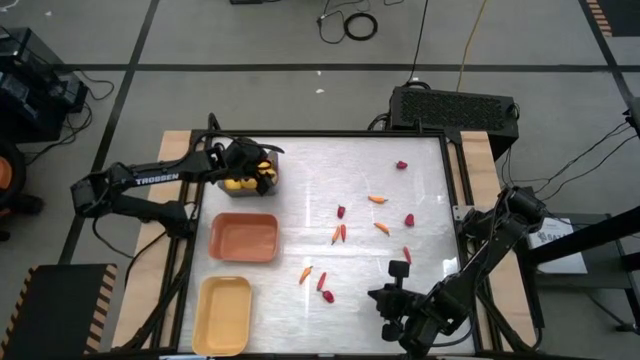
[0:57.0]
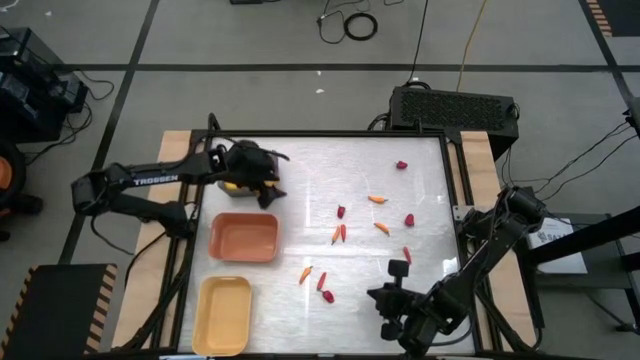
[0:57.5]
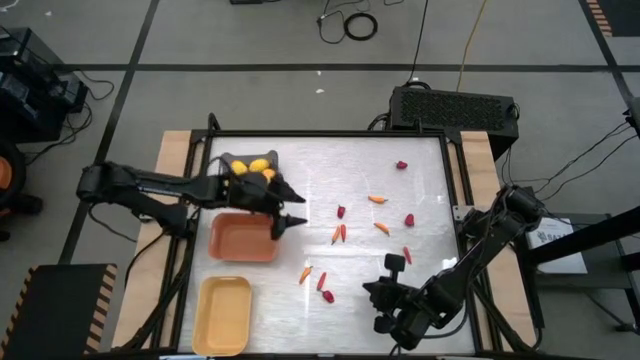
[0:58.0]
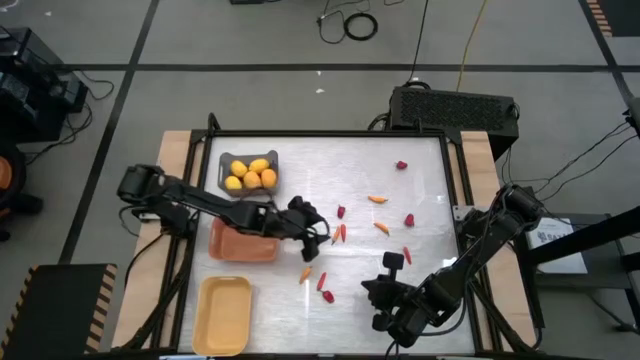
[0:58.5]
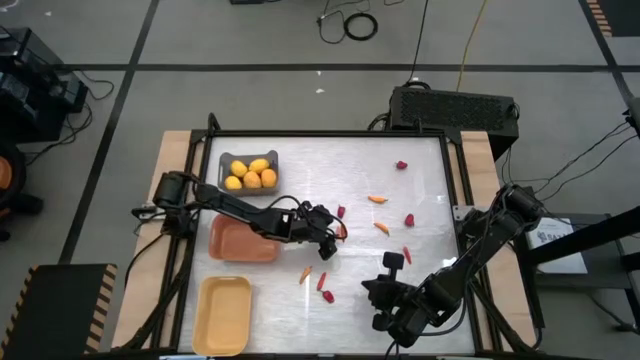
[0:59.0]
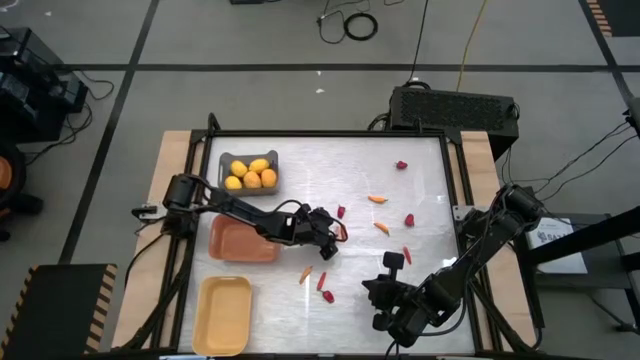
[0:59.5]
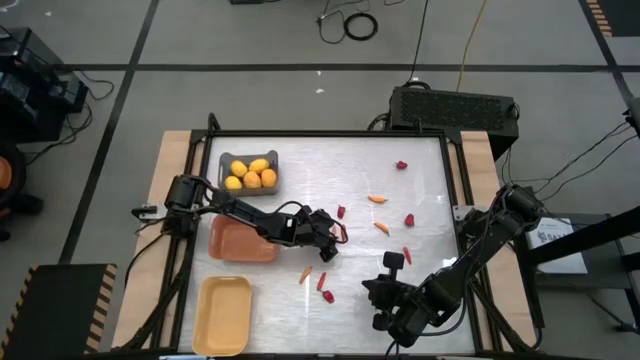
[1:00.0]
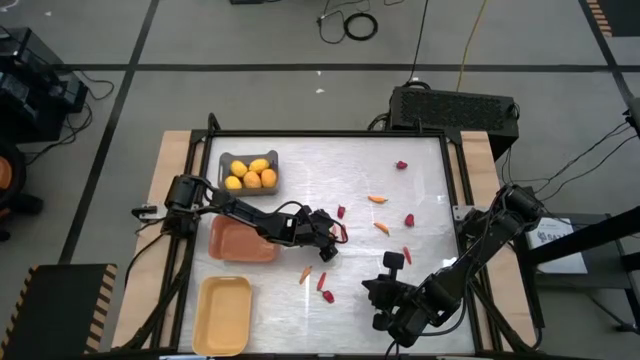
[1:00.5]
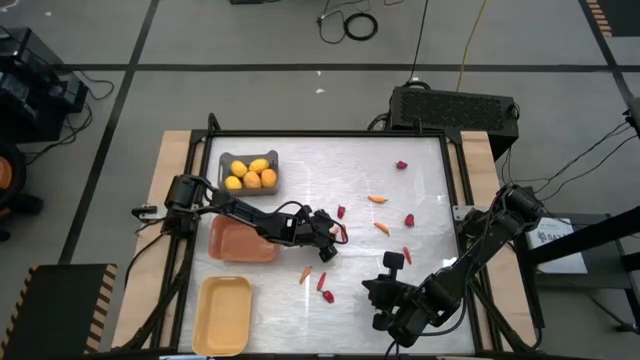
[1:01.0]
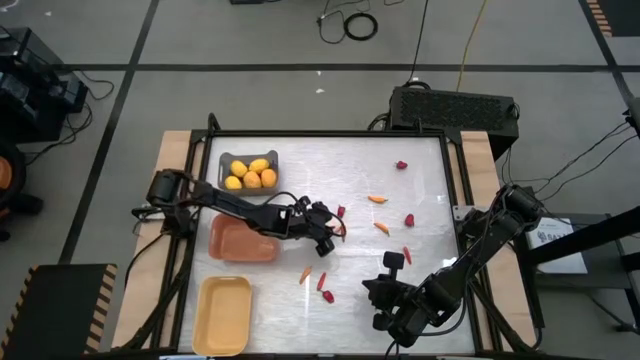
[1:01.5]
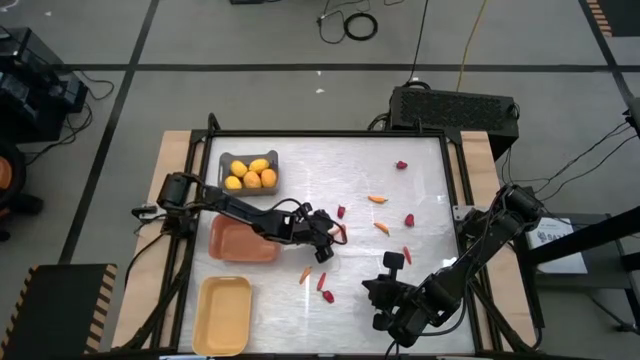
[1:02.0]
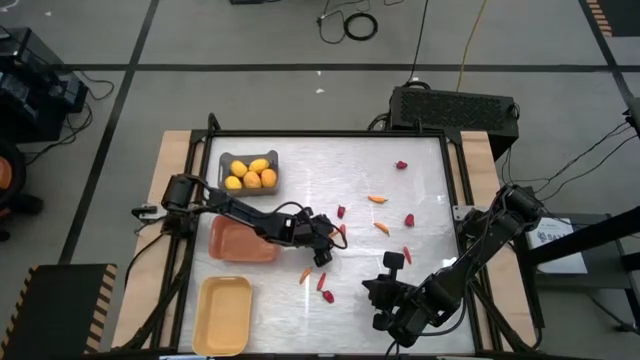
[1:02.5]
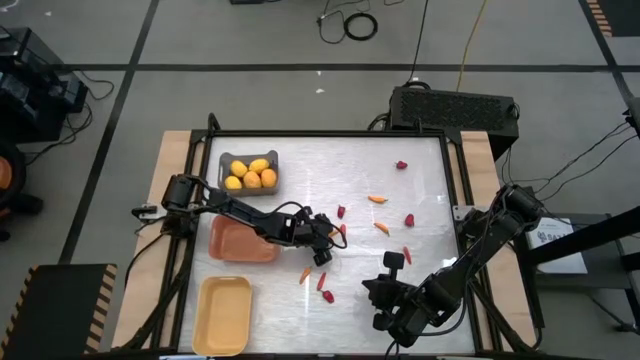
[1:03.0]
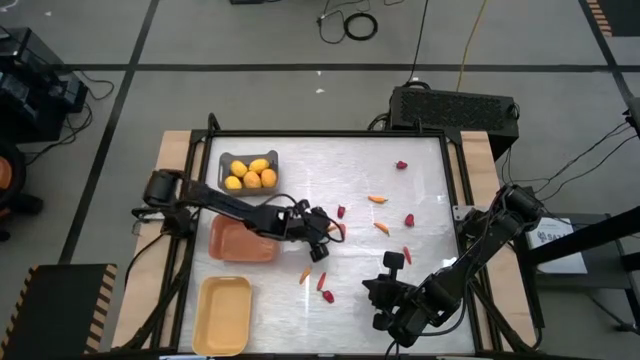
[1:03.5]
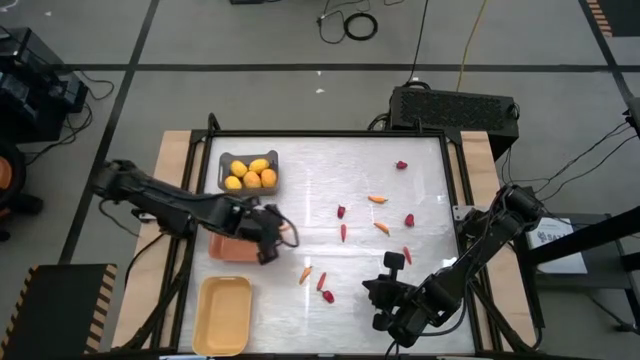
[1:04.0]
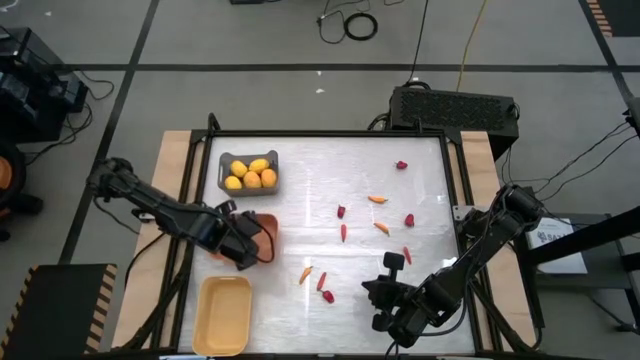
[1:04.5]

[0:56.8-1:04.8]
Task: Sort produce into baskets
Put the yellow chili pepper into the orange bin

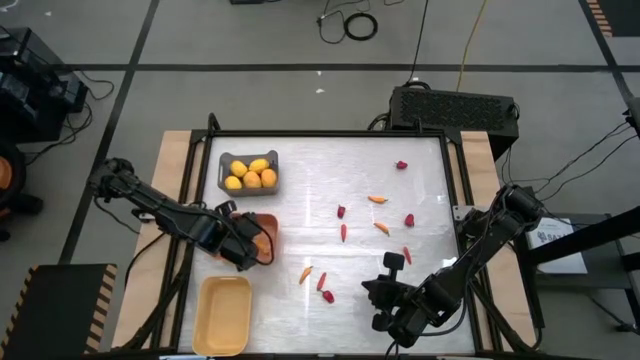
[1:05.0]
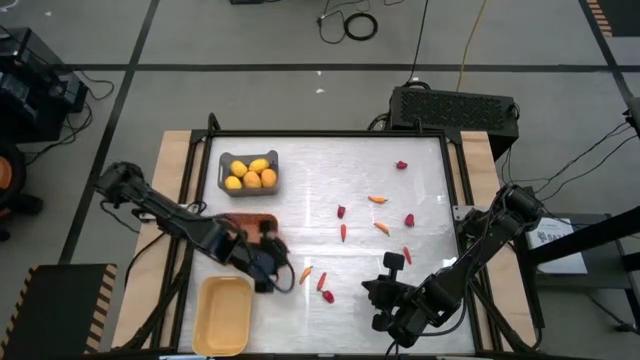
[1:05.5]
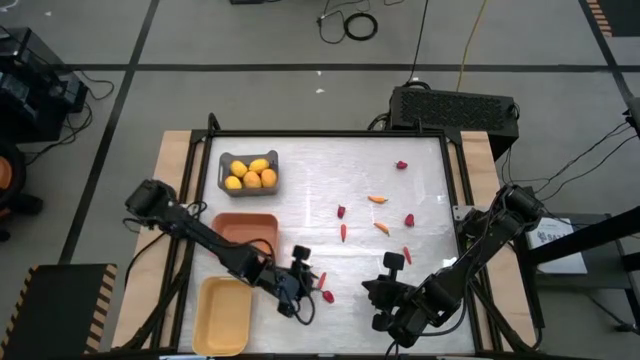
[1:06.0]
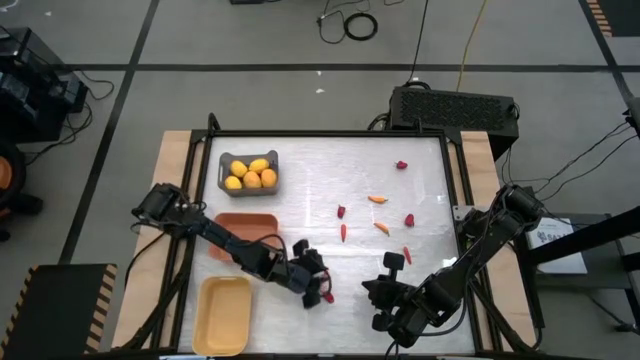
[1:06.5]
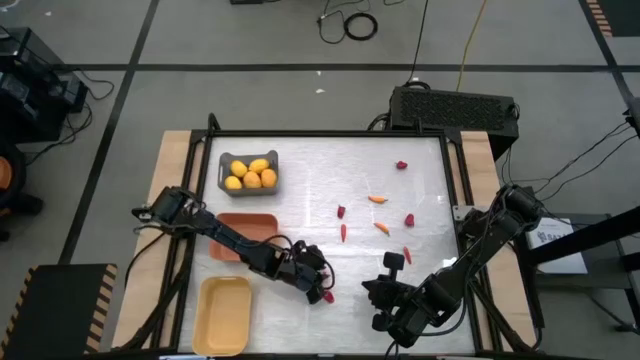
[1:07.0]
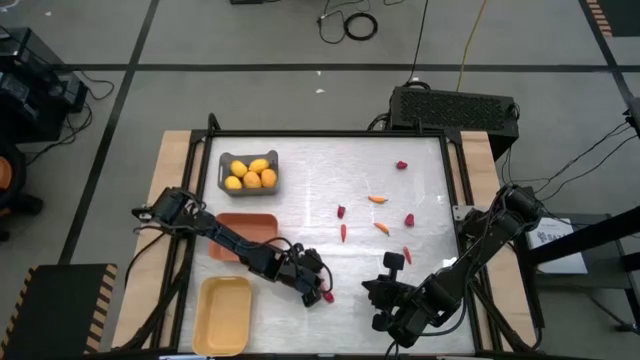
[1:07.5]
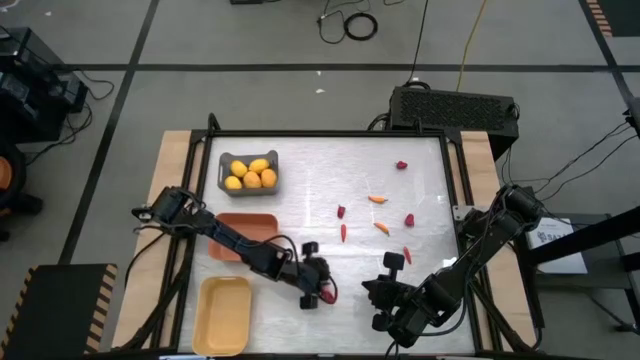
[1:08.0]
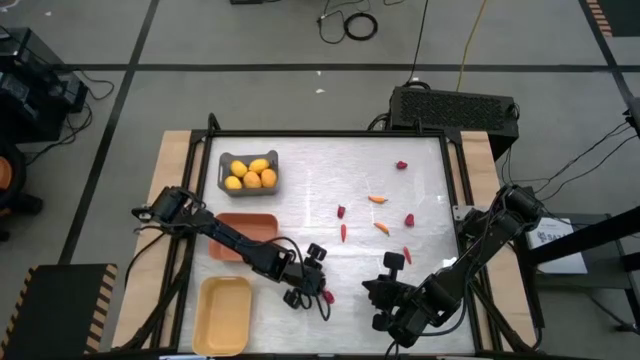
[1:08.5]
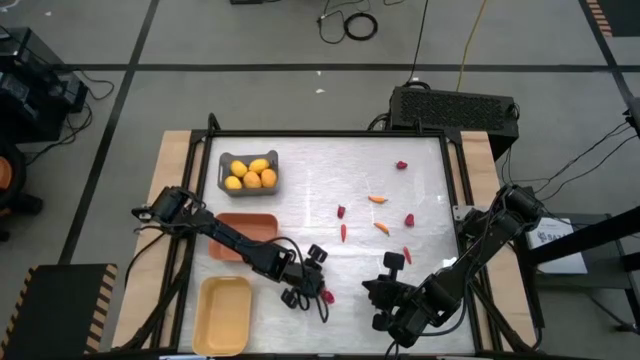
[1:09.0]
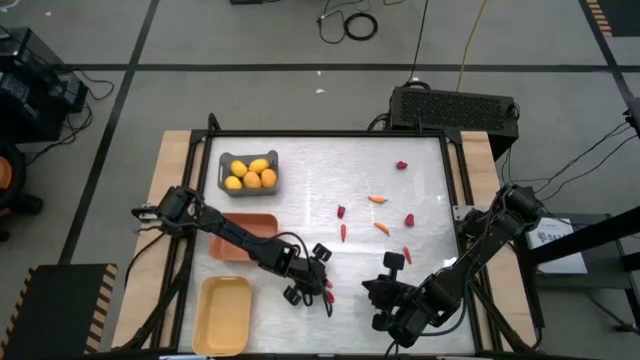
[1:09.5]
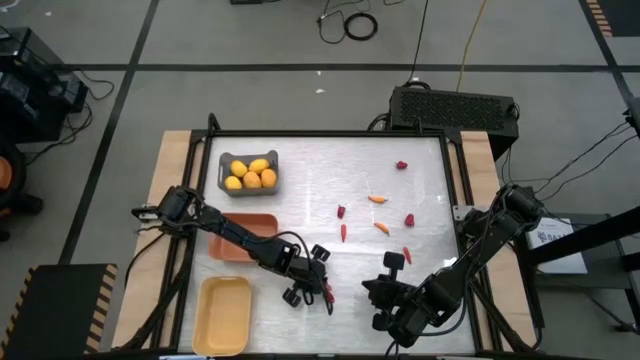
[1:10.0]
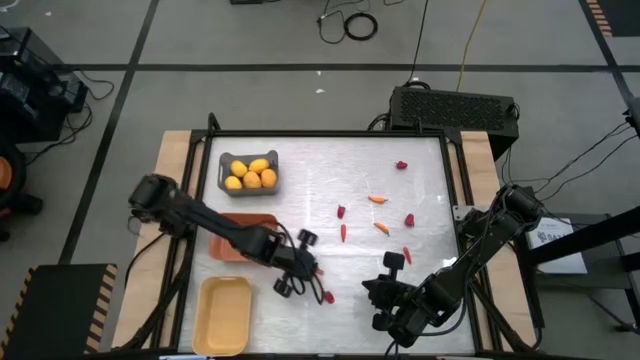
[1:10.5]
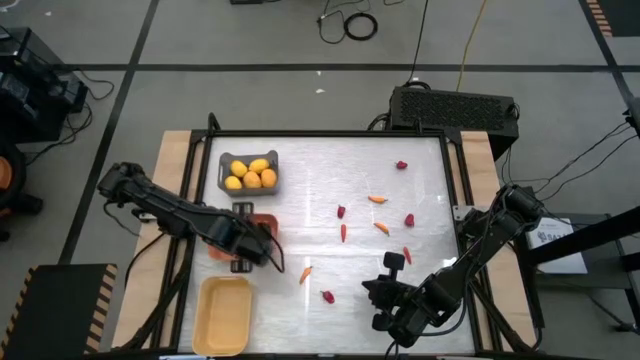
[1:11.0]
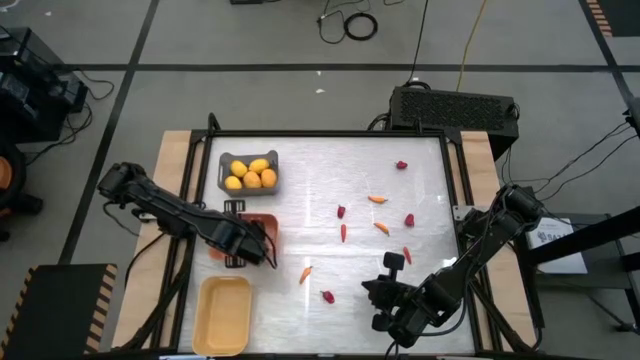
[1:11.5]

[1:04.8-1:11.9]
Put the orange chili pepper into the orange bin

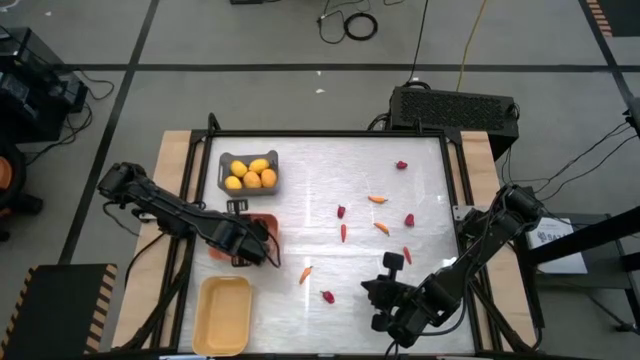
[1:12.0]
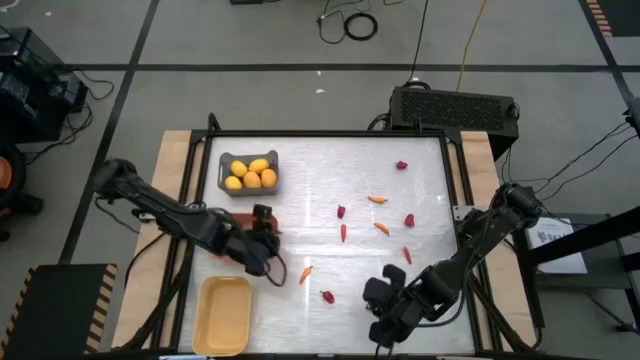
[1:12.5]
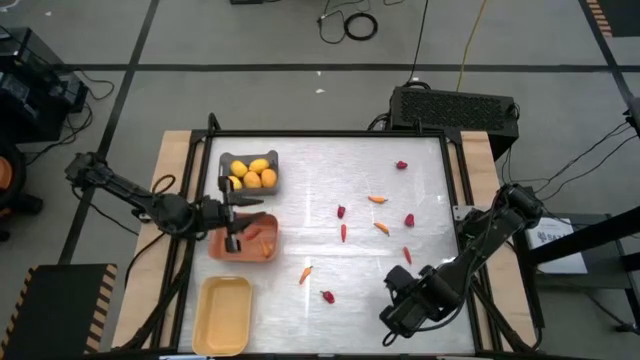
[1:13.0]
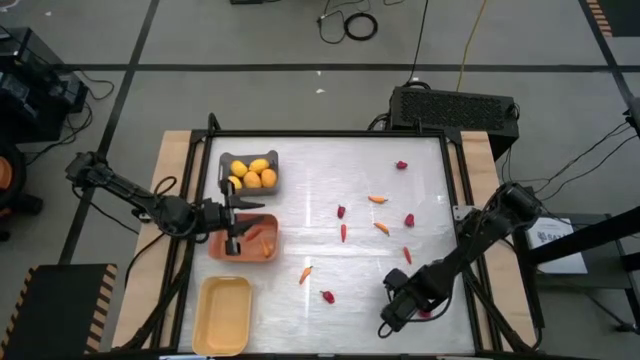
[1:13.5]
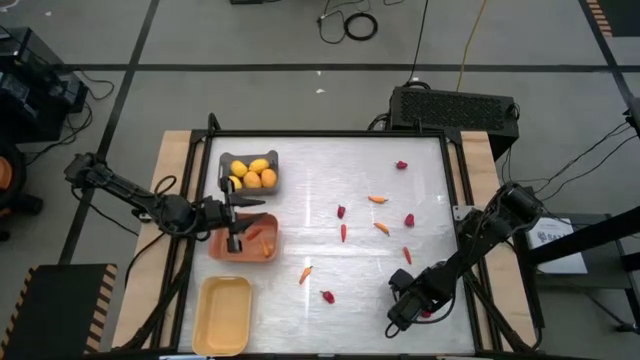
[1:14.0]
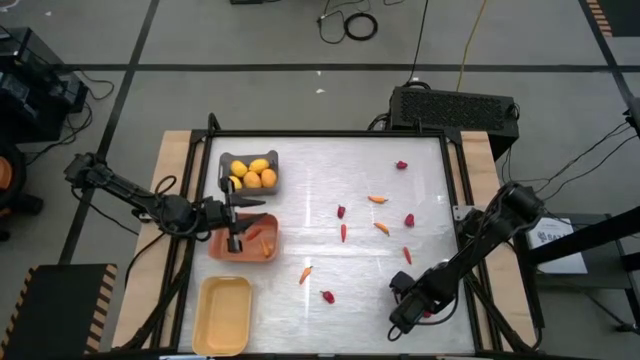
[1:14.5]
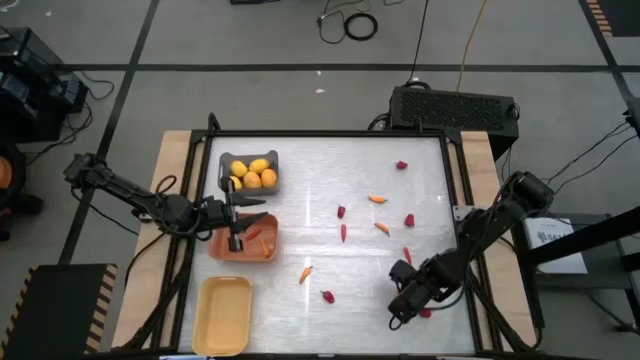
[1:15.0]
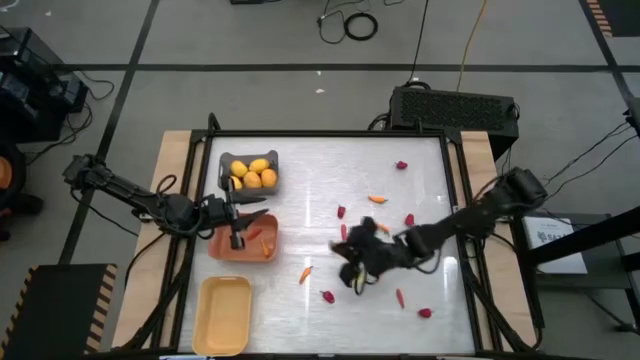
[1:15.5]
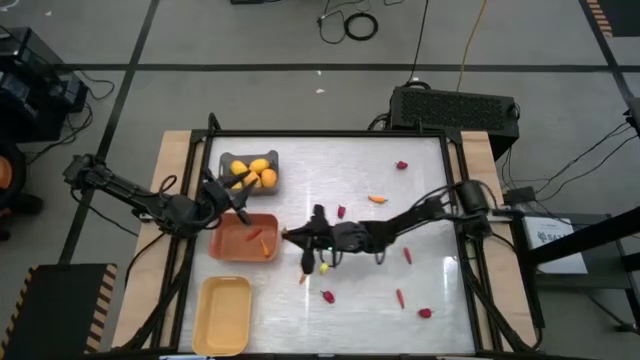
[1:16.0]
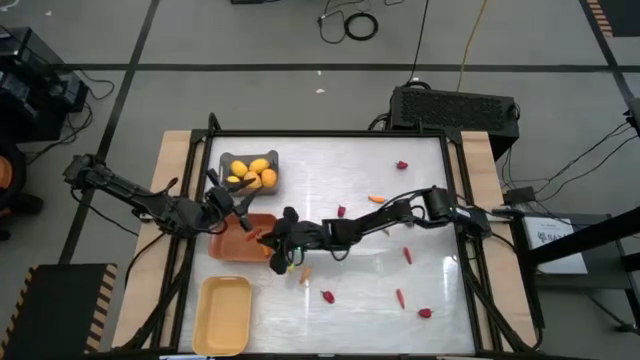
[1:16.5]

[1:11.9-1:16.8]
Put the yellow chili pepper into the orange bin
